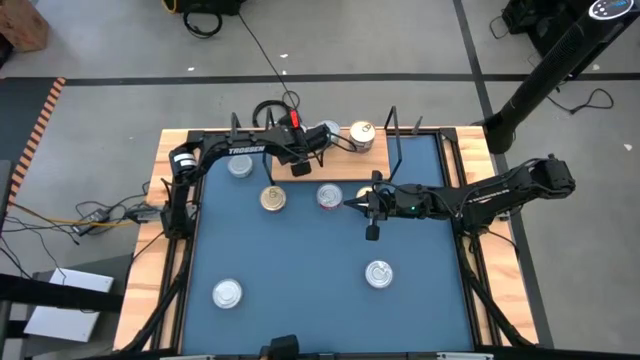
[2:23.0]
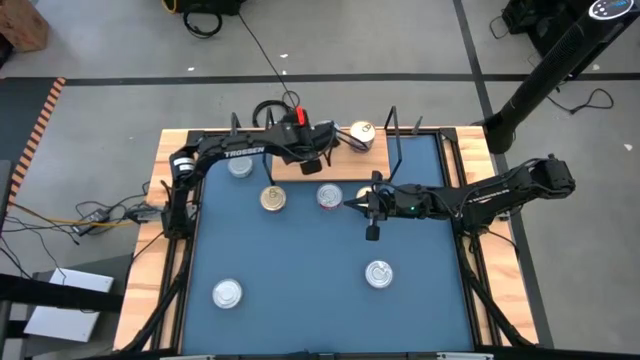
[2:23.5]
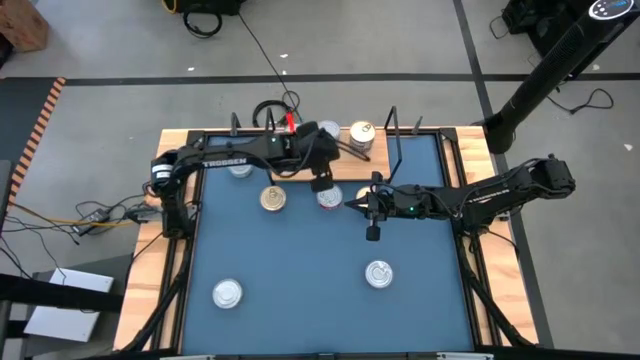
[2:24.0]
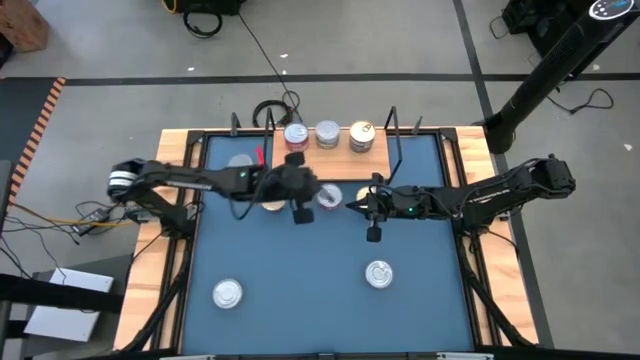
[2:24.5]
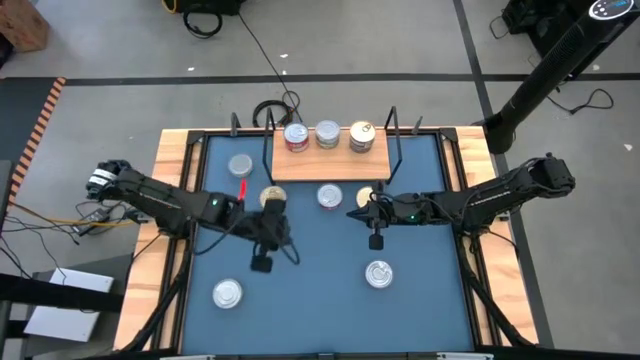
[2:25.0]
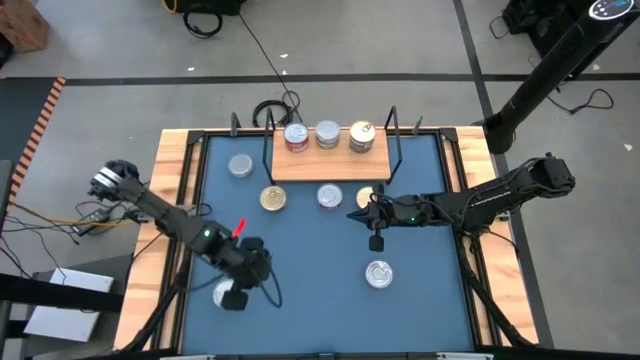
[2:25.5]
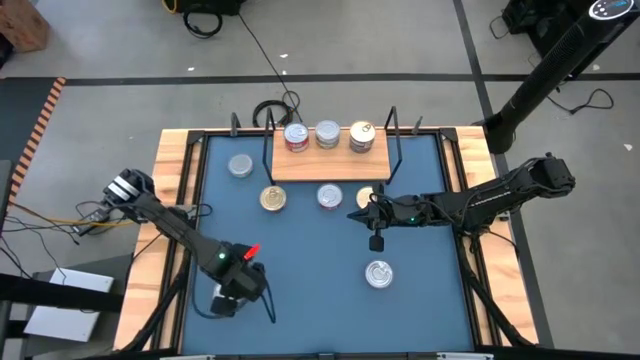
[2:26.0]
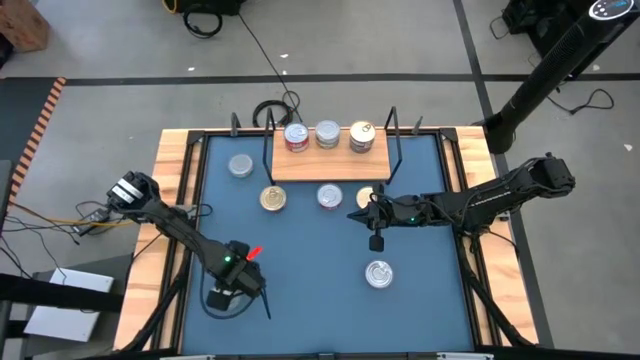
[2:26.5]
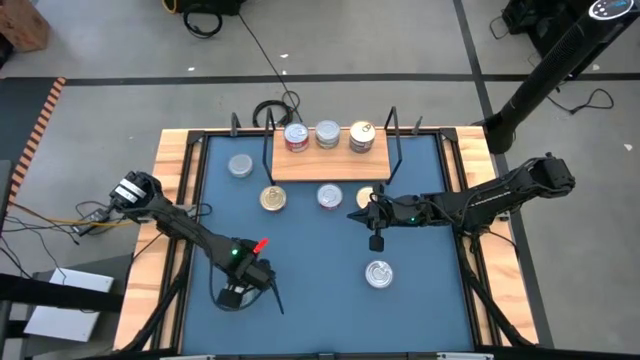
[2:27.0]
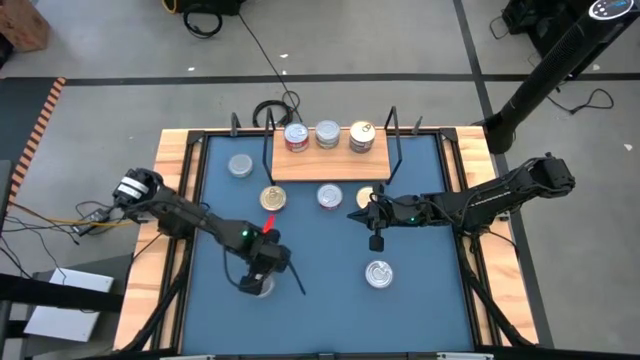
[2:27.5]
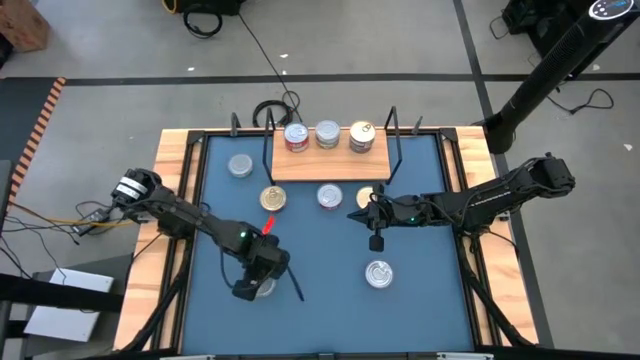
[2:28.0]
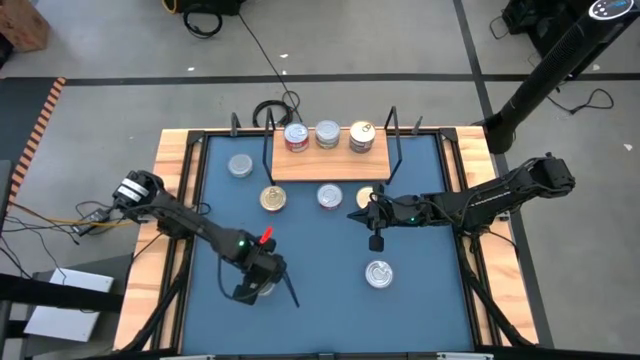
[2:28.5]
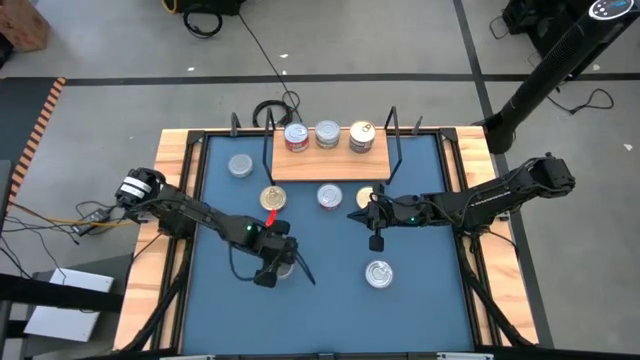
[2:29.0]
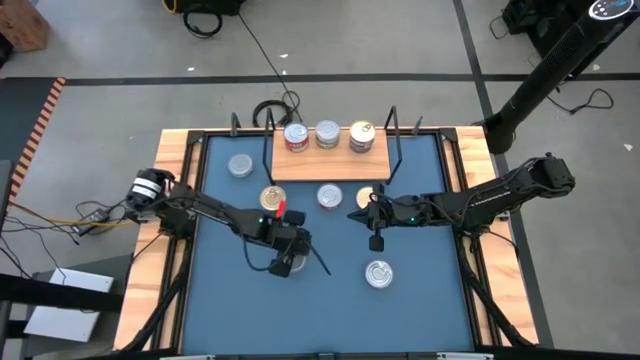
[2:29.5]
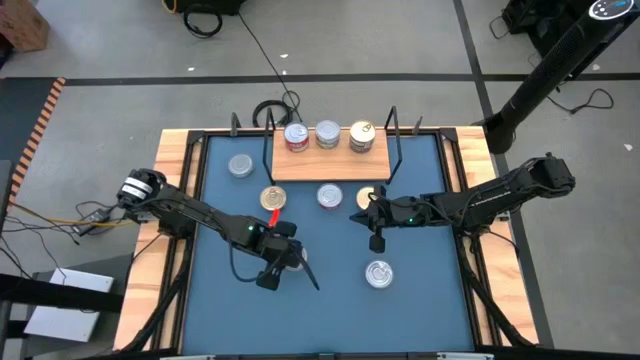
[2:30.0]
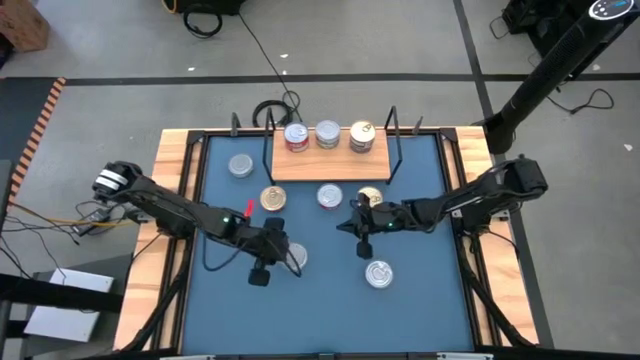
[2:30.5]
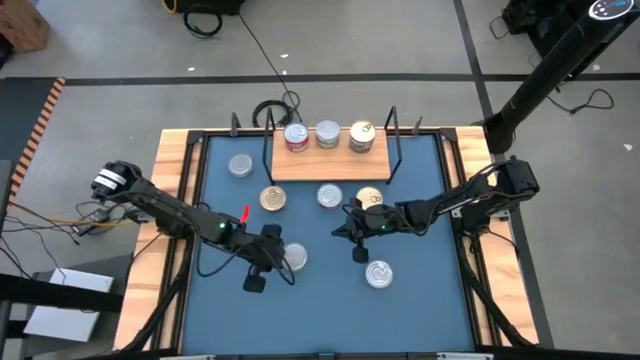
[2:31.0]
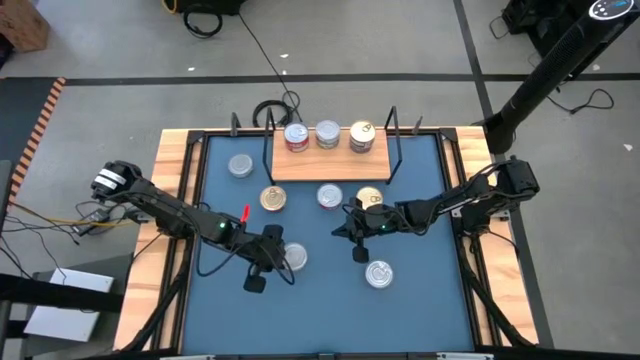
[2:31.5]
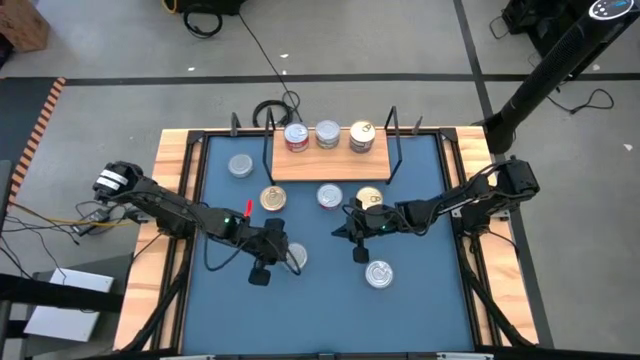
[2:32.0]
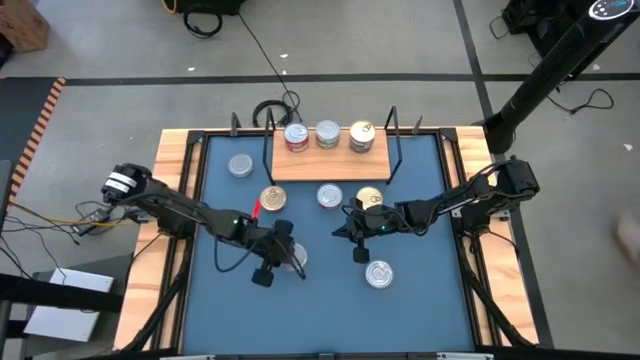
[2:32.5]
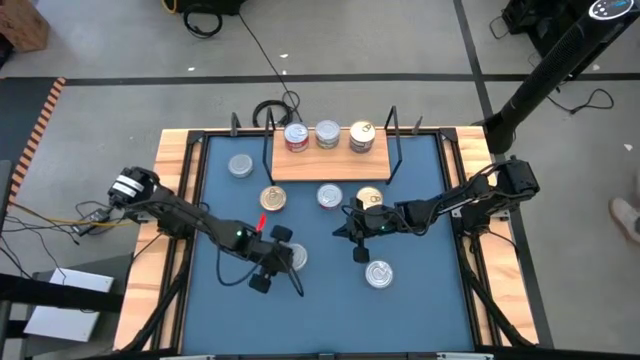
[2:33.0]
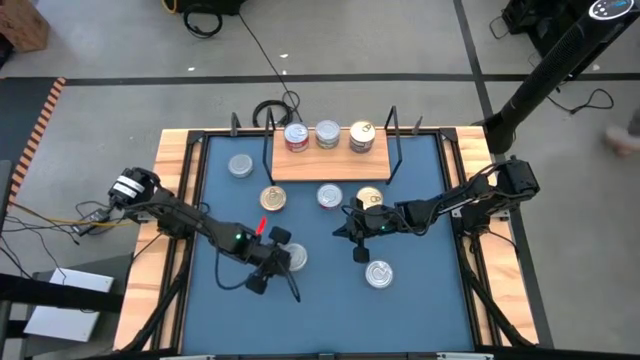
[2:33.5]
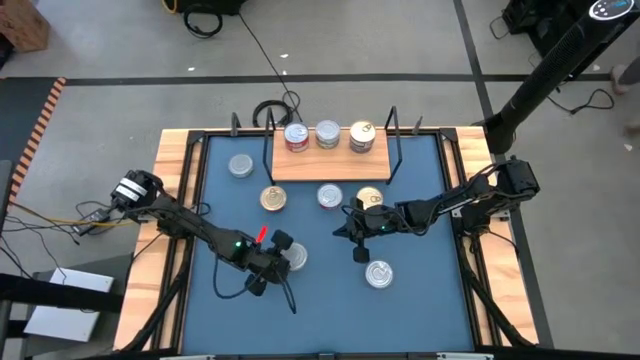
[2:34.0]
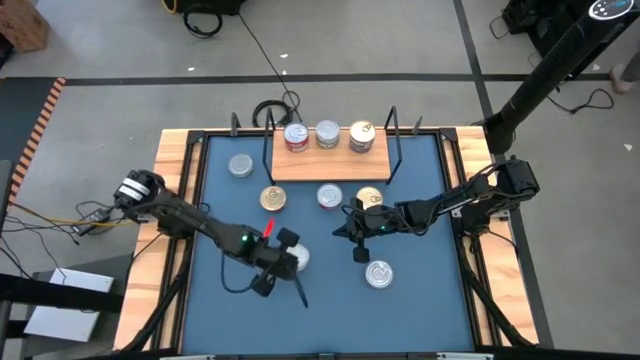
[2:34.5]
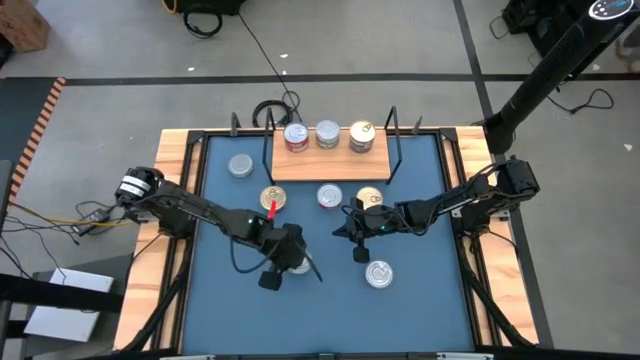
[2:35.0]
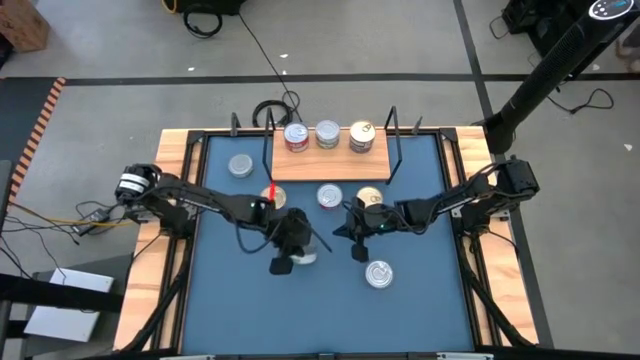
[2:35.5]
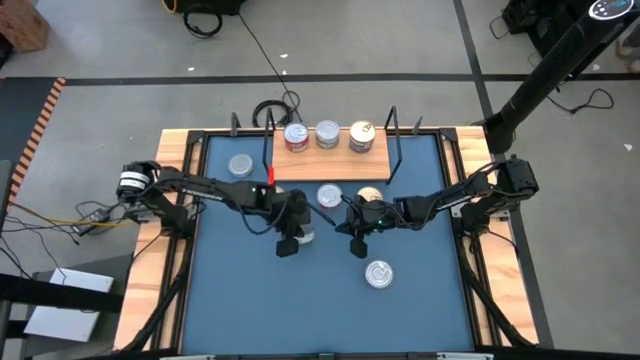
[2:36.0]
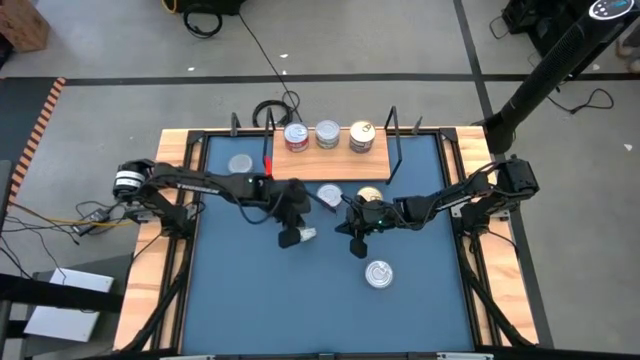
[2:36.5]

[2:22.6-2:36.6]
Task: Stack canned seafood by type on shelf
Put the green tuna can aligned with the stacked green tuna can on the shelf
